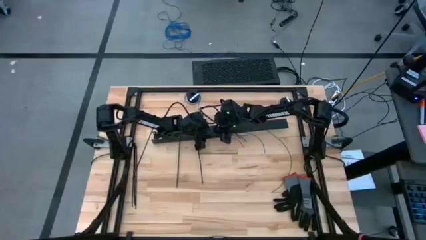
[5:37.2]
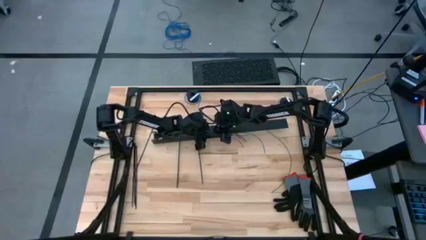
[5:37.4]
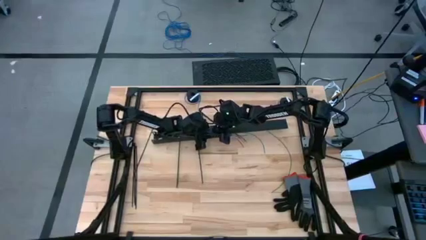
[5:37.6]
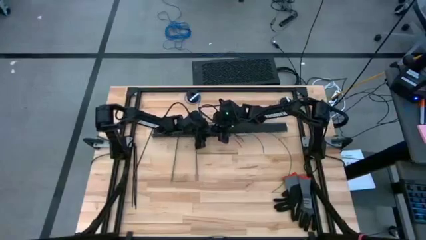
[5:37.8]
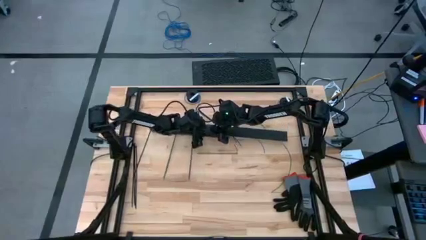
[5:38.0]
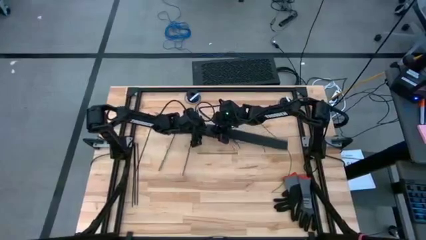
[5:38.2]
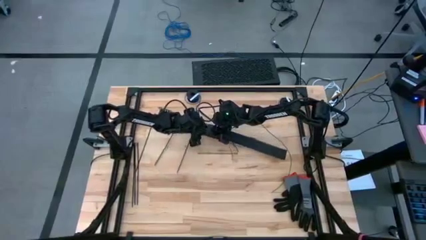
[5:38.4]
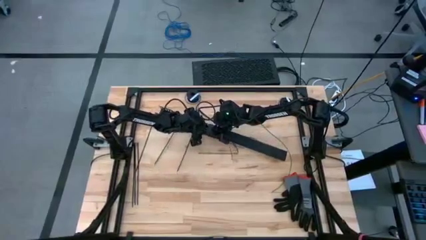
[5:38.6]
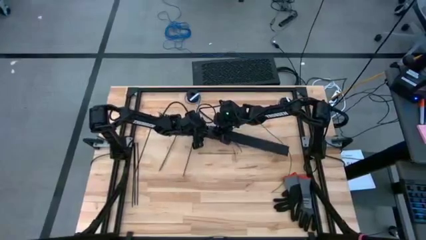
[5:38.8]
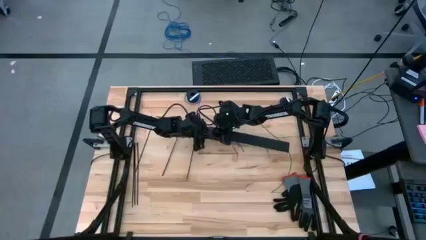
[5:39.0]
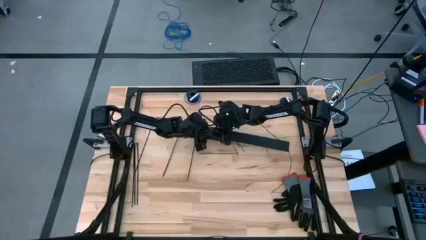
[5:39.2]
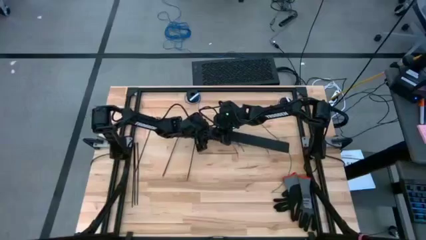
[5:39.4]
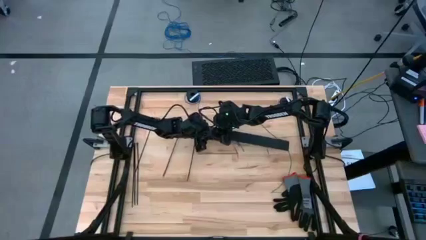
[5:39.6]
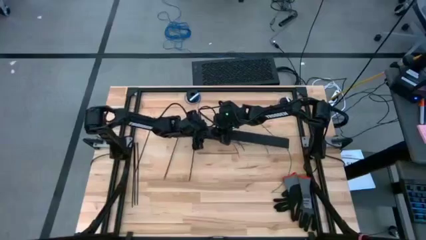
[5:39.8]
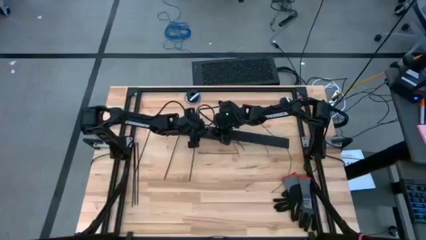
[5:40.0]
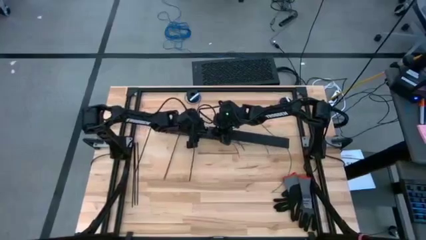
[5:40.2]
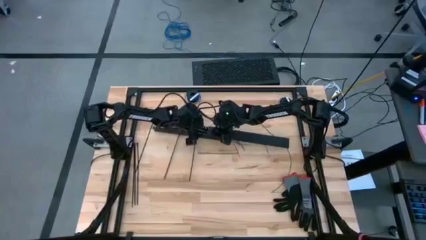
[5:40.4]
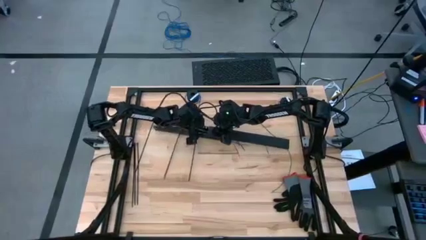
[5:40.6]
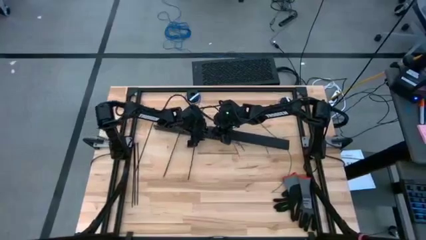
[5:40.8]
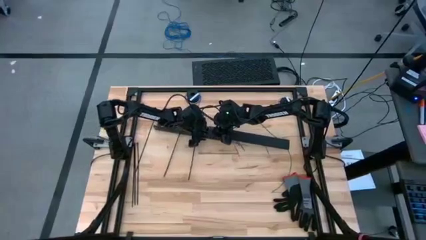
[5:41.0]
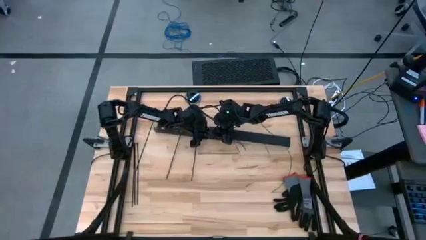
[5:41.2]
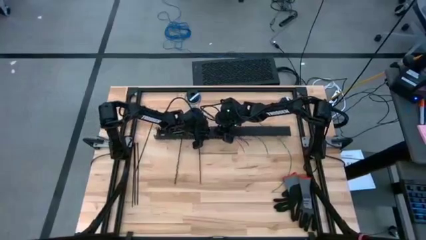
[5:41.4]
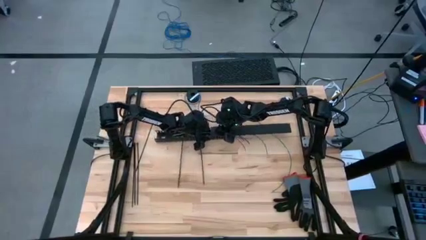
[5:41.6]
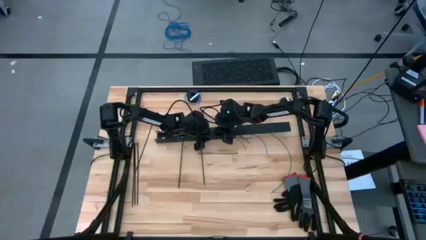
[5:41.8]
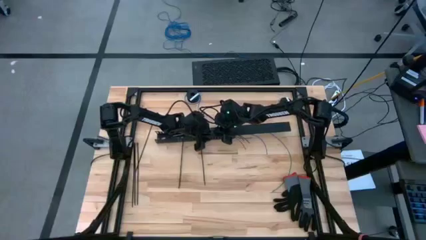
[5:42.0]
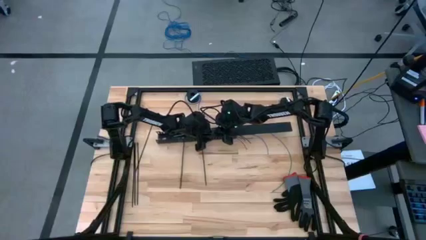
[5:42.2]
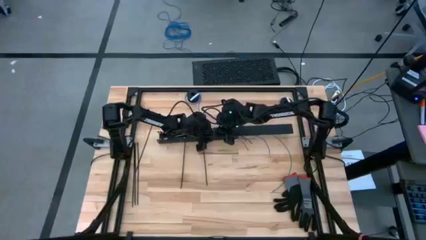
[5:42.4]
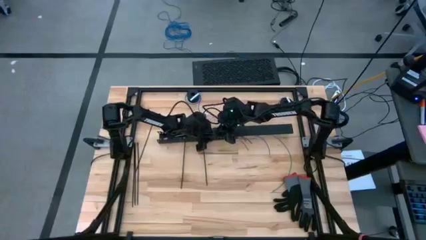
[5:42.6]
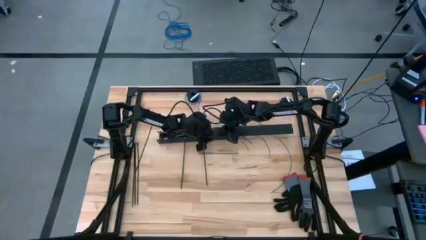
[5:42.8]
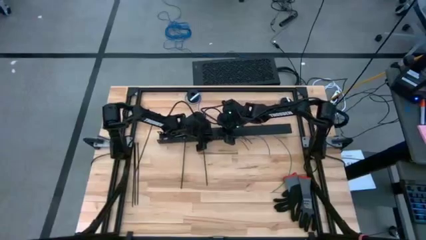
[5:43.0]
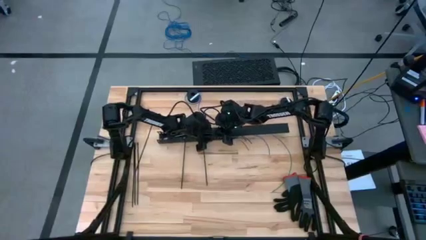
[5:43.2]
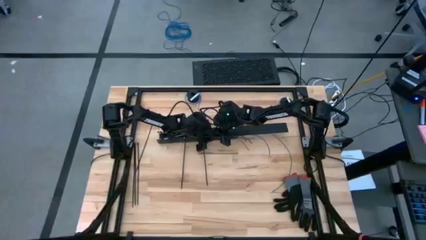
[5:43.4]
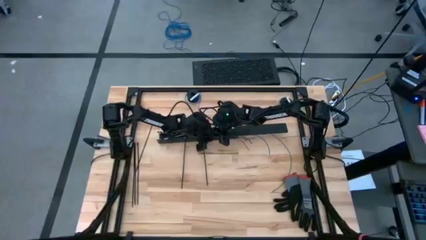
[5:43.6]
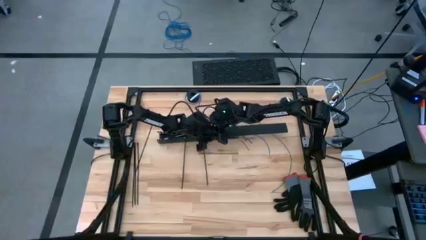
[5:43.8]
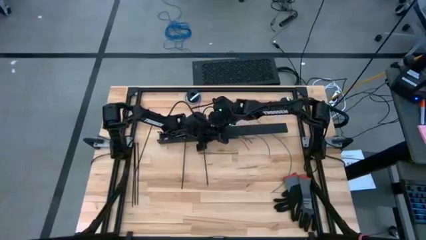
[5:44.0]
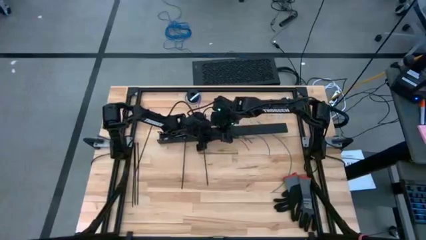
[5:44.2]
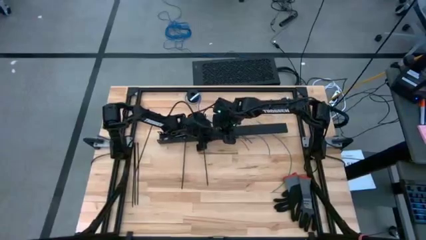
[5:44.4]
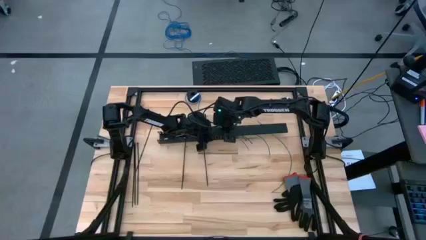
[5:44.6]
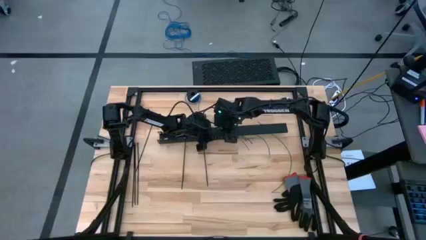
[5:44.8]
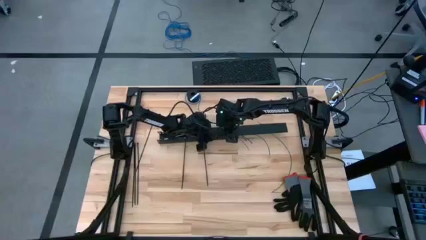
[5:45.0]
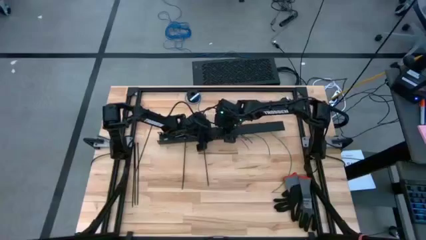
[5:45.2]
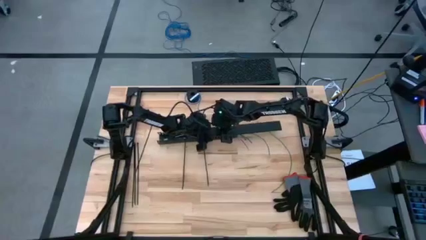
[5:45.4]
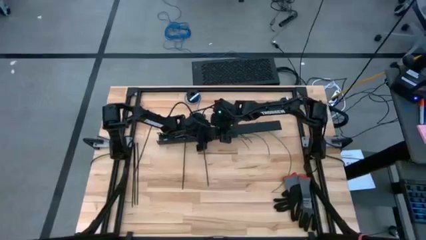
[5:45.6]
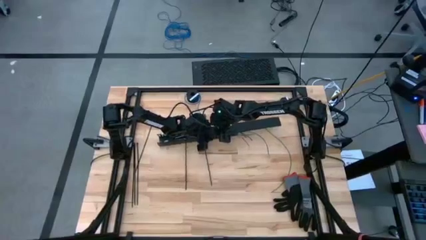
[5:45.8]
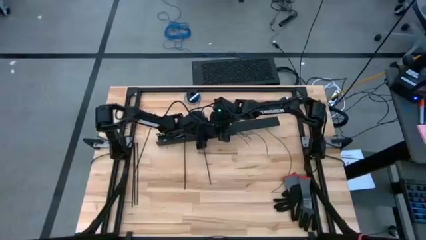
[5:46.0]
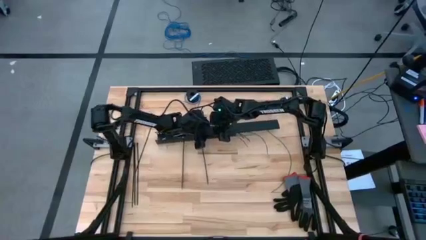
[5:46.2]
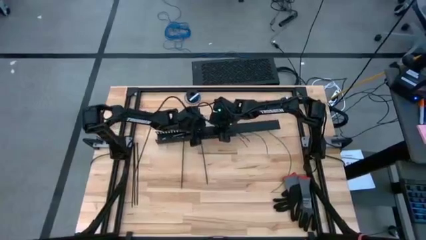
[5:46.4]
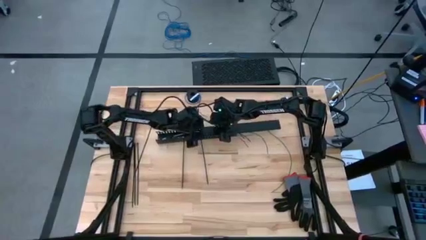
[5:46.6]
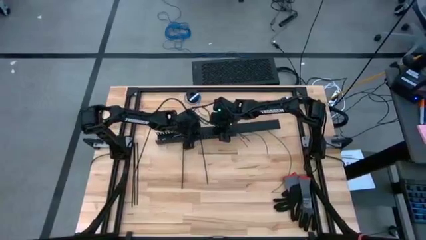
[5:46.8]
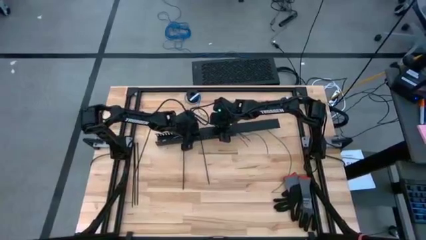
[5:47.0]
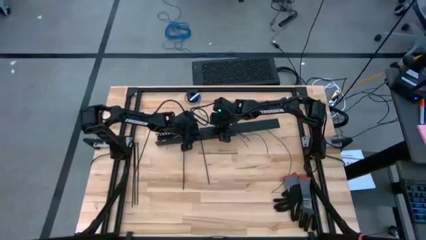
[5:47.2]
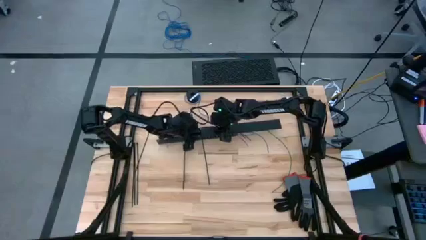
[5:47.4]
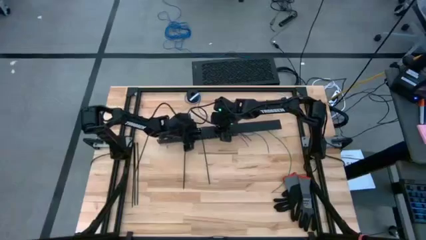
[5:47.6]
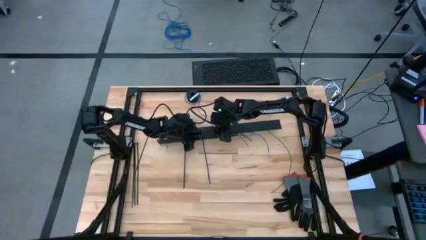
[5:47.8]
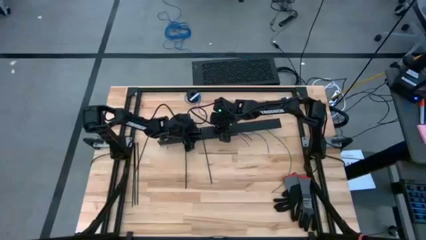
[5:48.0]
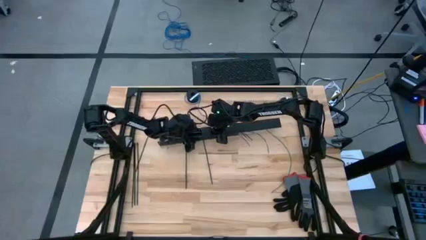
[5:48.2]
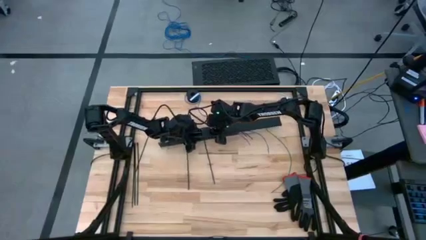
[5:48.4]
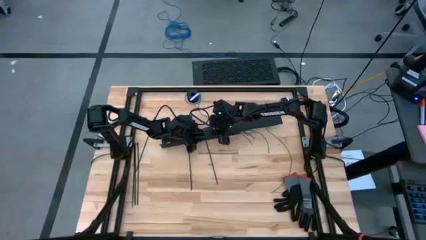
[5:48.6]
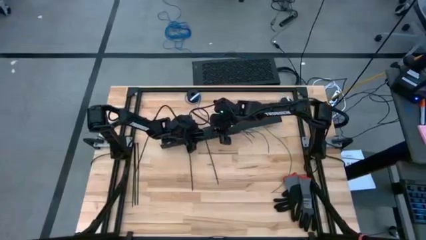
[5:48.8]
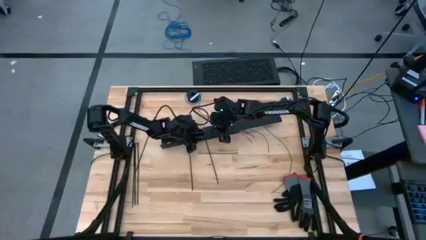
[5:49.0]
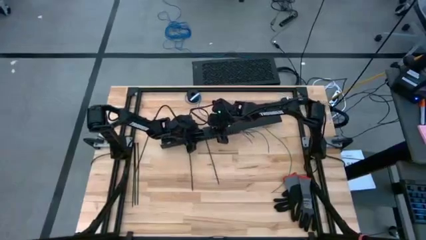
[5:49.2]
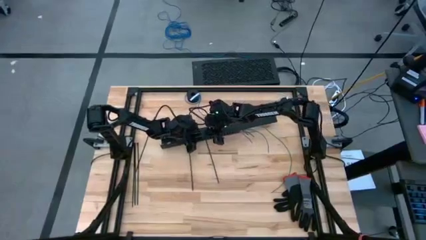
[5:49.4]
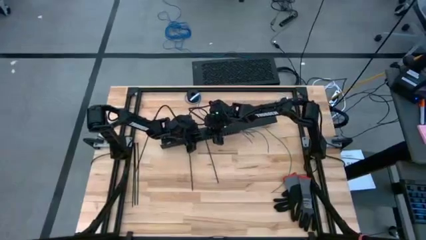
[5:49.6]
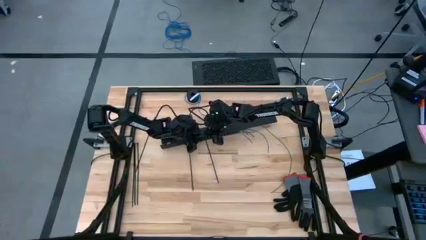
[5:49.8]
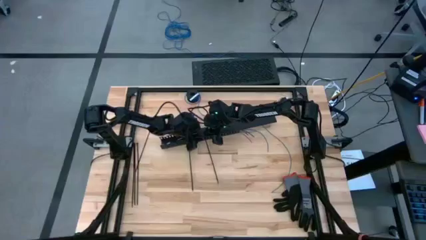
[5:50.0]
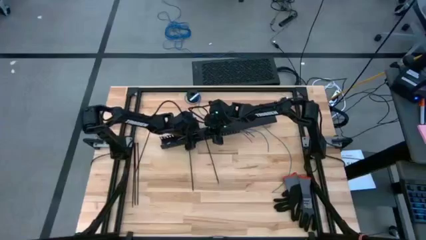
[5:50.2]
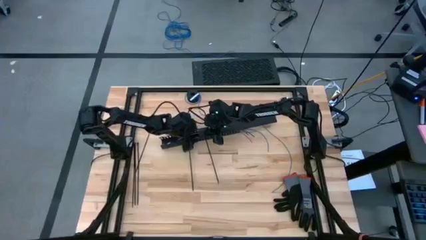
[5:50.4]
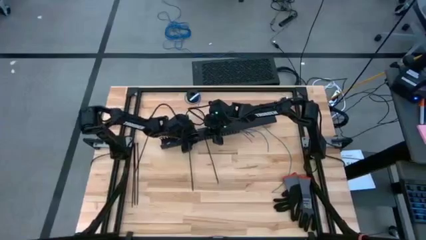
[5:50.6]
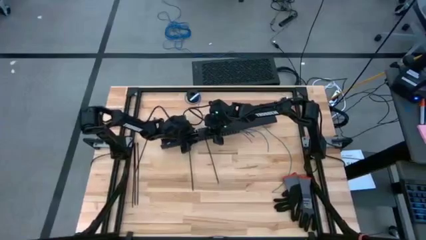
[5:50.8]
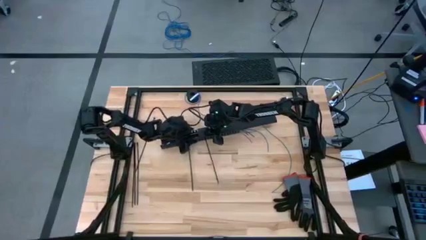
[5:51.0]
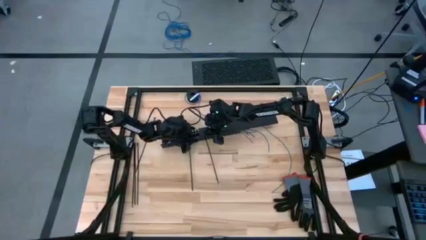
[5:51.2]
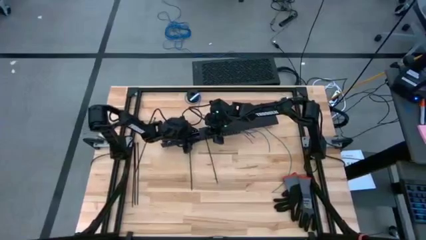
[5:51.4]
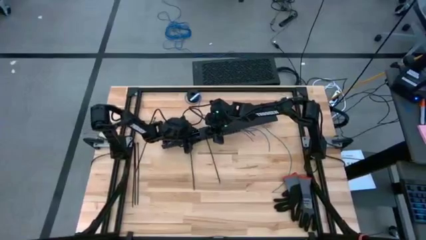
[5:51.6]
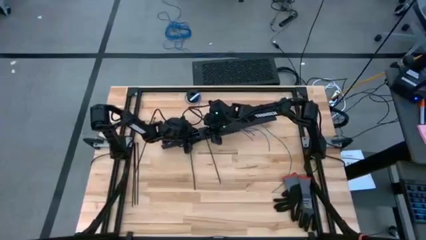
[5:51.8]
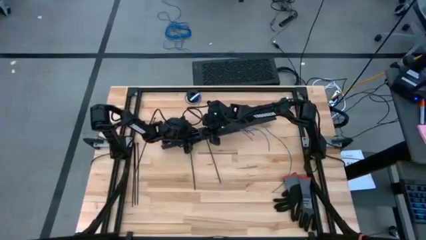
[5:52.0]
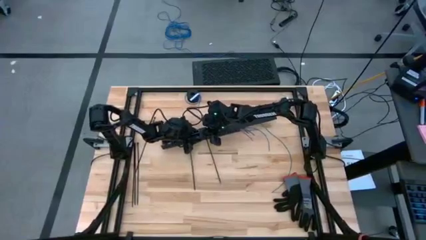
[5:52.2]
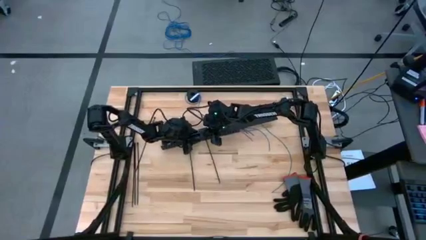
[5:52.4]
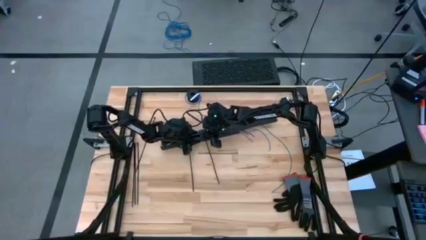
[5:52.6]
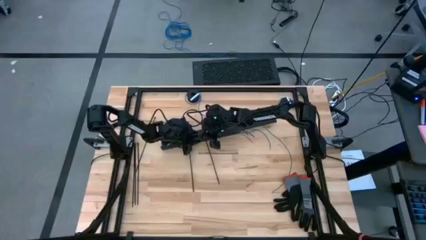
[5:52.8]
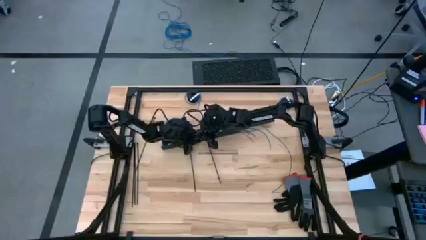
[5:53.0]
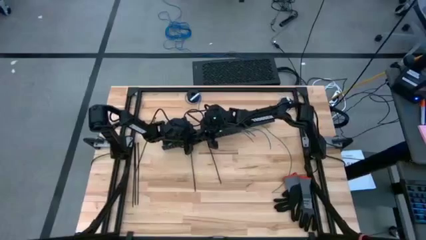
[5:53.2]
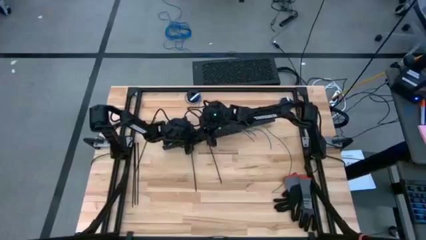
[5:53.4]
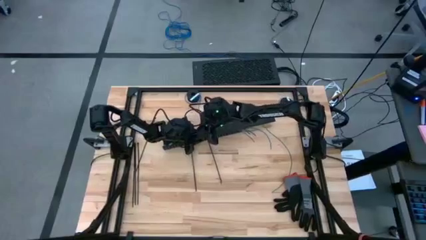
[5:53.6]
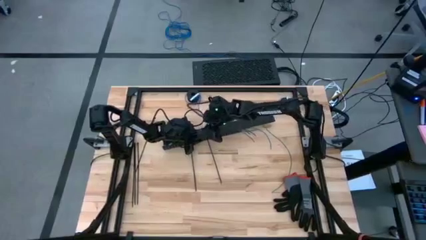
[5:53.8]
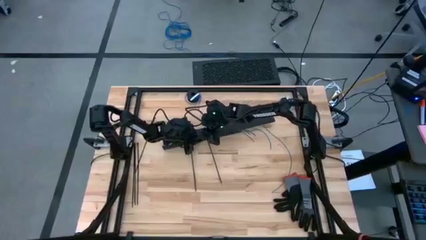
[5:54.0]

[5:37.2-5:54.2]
Task: Ziptie cables
Close the black cable duct
